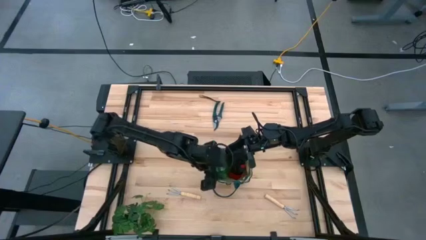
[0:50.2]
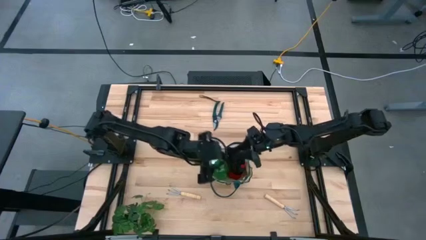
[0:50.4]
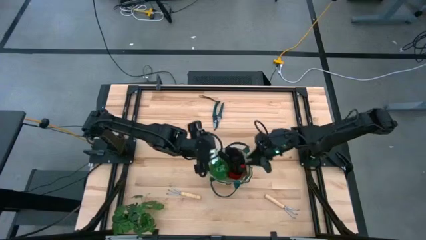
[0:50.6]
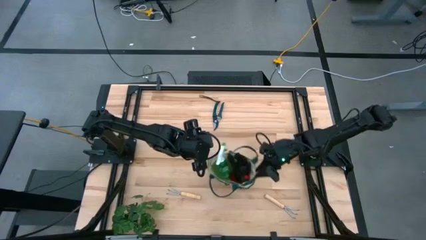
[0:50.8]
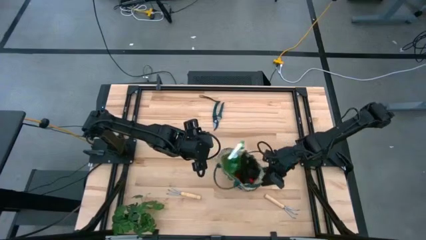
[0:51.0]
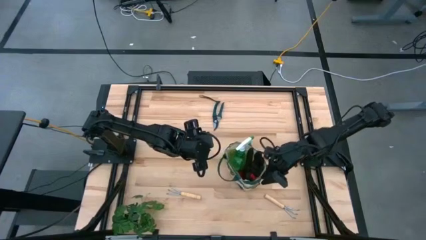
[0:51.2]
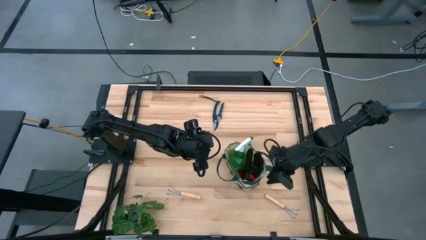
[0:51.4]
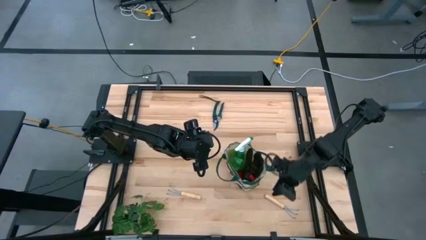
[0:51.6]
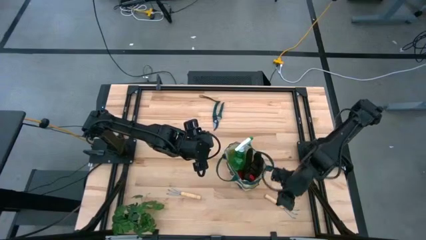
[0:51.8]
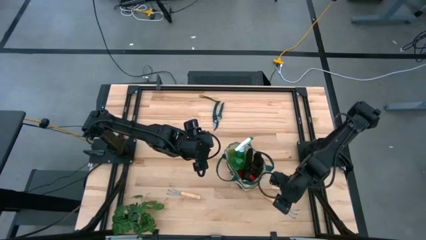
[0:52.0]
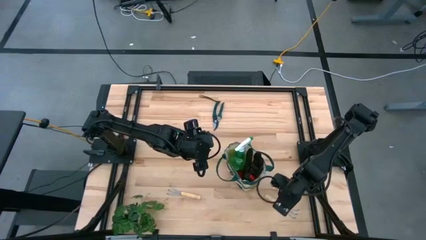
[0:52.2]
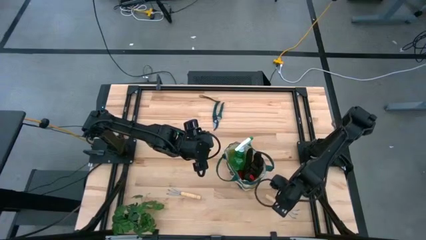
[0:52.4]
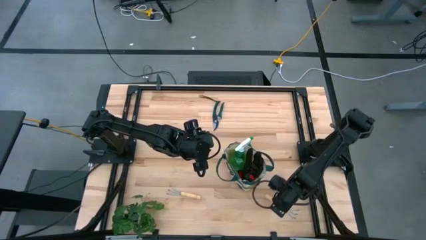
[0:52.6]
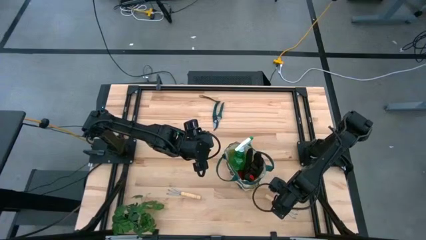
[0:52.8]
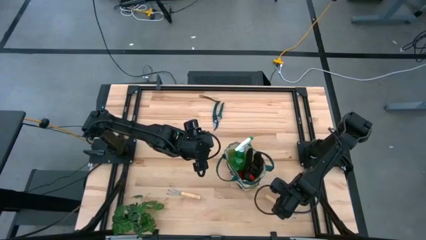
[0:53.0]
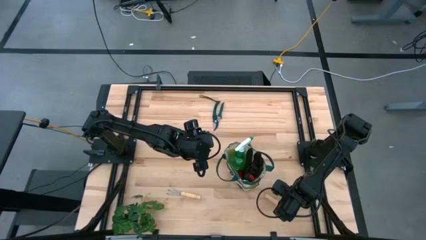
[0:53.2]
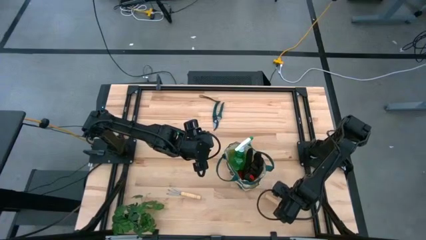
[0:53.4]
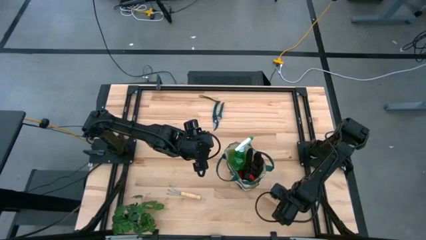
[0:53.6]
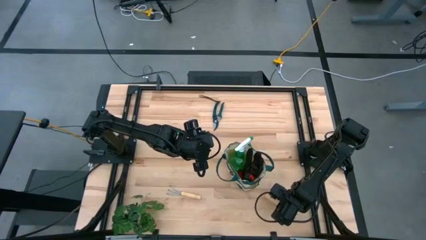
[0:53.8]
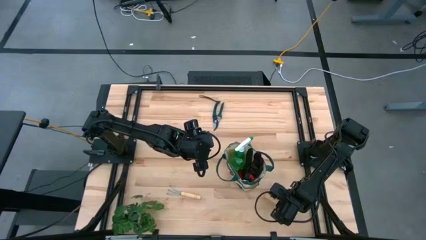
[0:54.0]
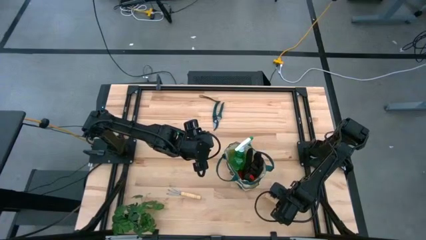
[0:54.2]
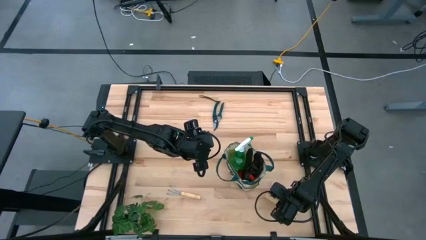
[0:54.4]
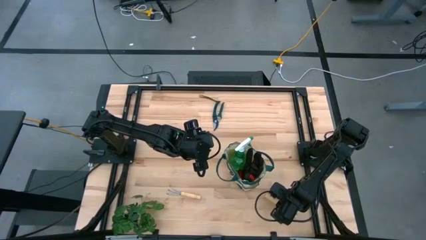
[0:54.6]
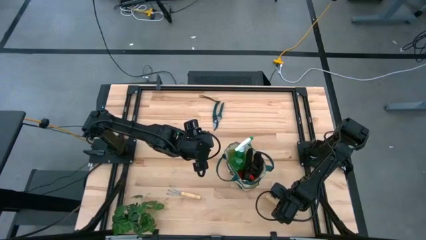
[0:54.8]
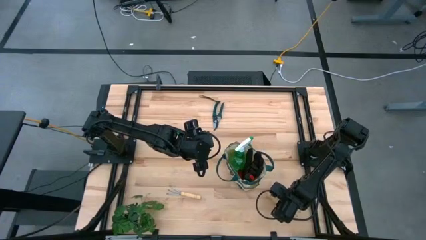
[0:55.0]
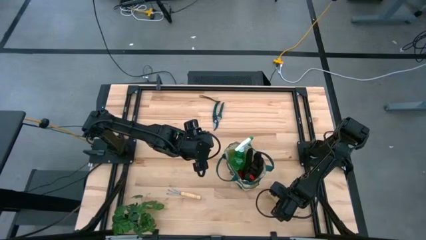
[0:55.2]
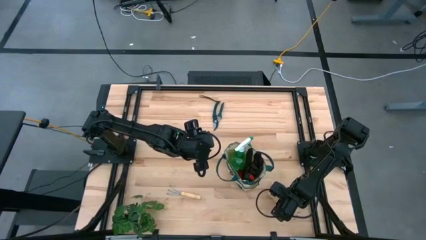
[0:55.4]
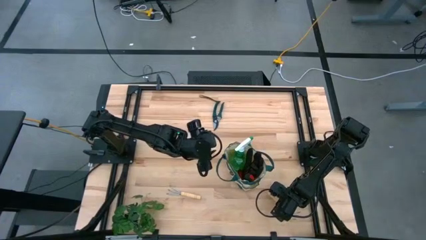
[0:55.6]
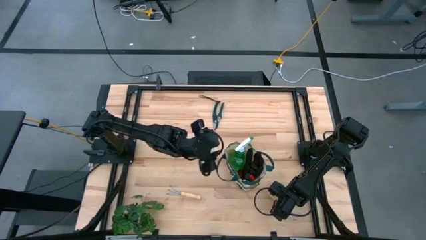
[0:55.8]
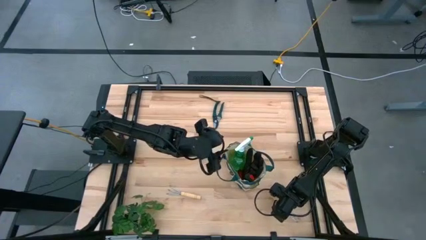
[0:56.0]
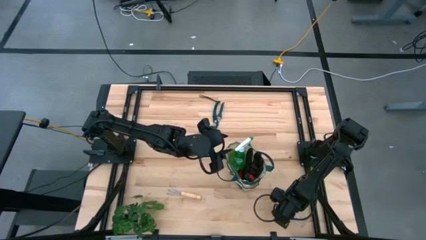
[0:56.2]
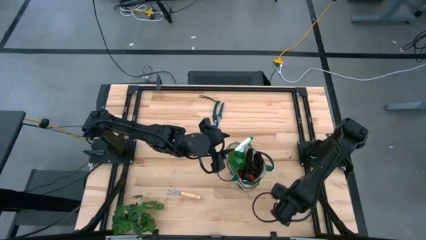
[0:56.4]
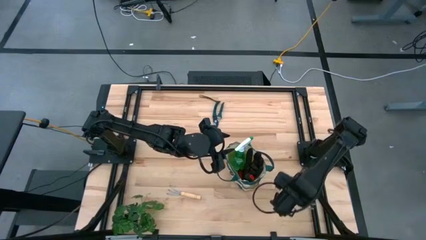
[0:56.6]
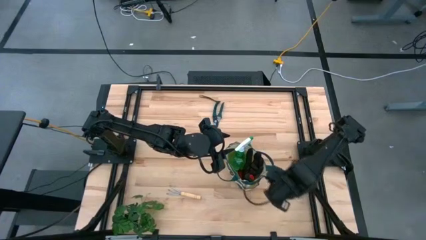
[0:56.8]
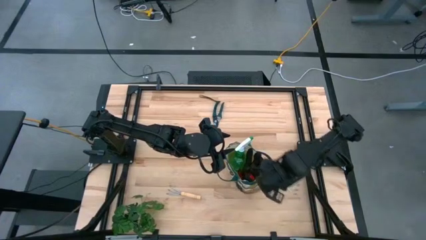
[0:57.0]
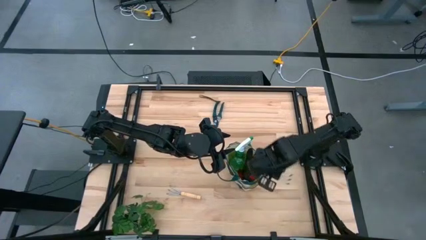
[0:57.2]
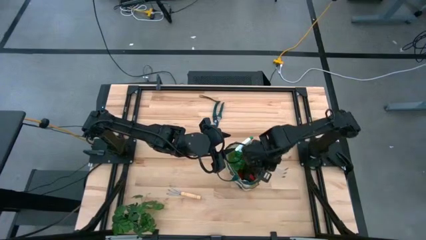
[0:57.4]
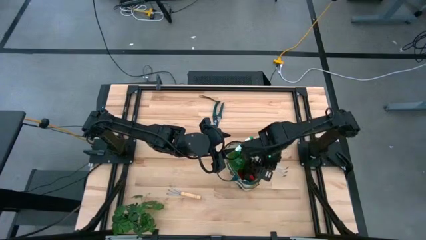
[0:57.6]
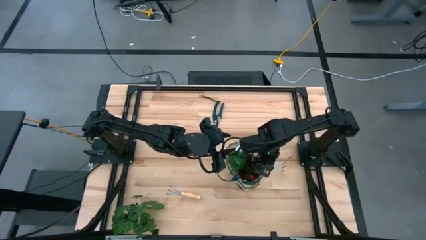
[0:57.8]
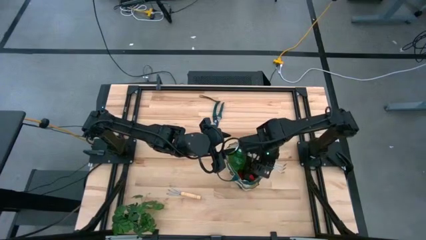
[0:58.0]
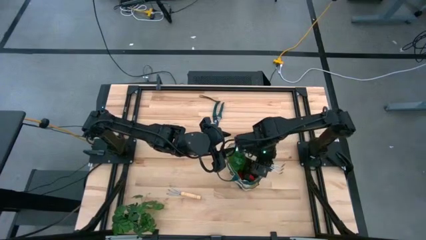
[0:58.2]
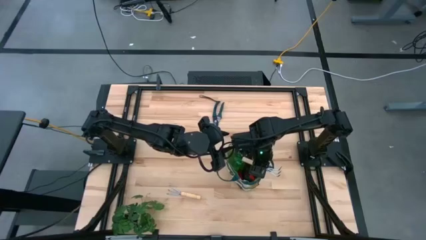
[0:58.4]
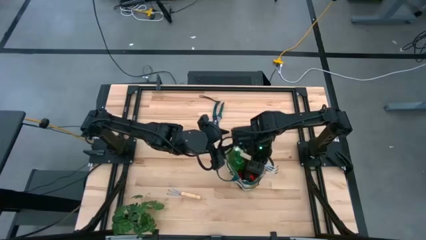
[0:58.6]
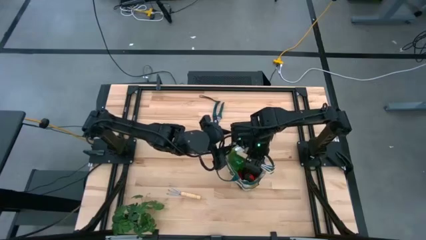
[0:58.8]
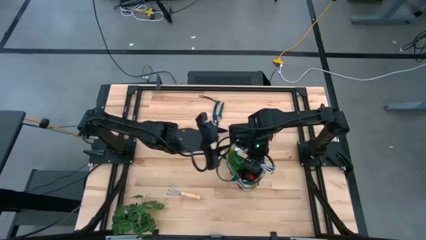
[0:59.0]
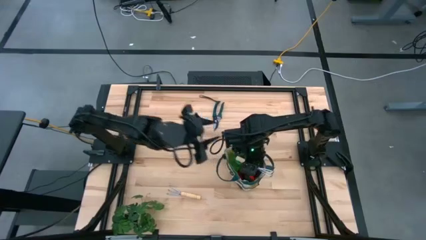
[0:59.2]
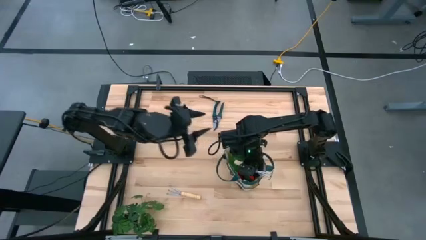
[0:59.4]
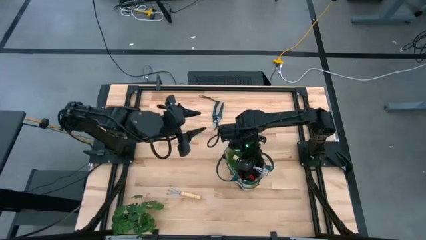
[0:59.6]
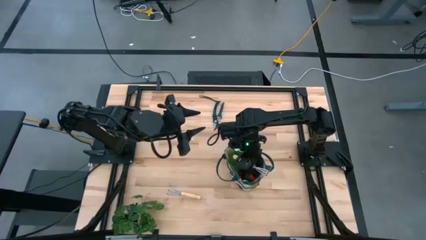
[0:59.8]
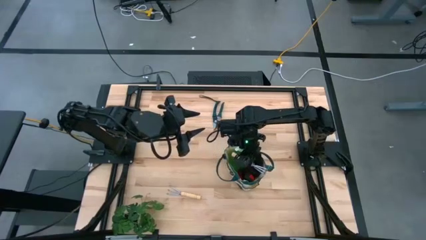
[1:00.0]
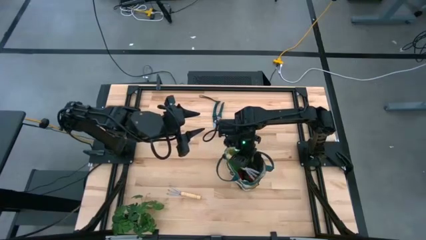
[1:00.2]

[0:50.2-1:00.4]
Task: Pick & Place Garden tools in Gardening bag
Put the right brown hand rake into the green gardening bag

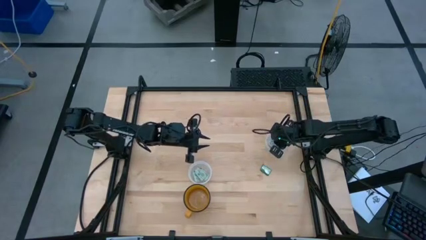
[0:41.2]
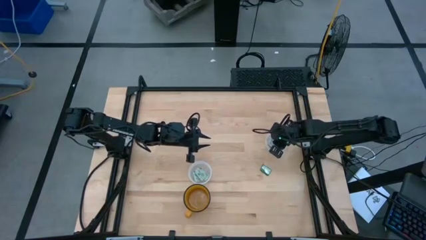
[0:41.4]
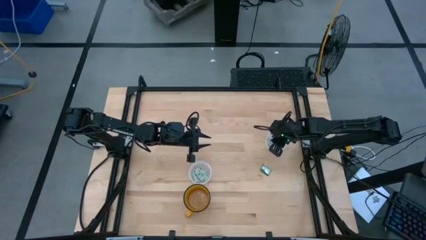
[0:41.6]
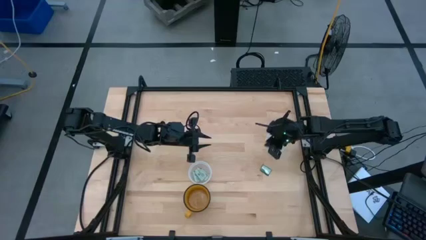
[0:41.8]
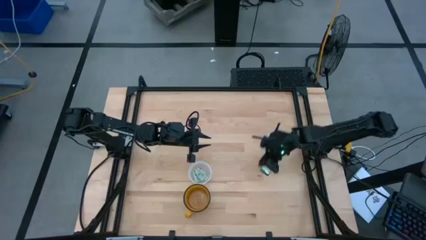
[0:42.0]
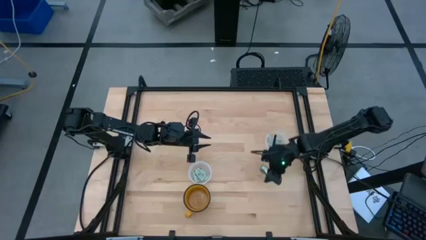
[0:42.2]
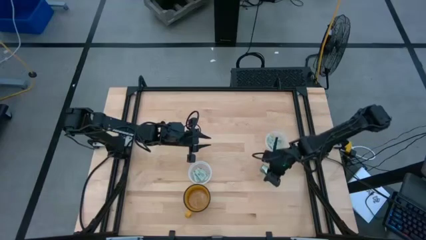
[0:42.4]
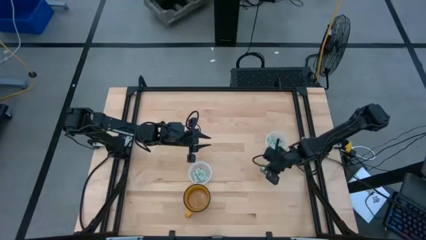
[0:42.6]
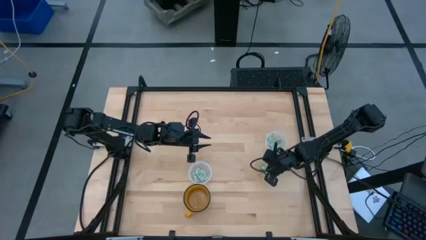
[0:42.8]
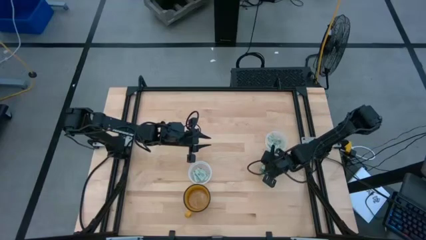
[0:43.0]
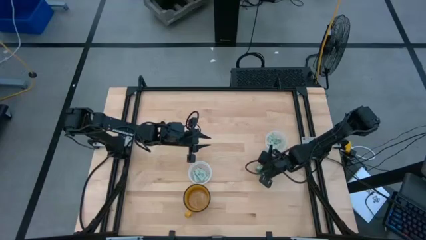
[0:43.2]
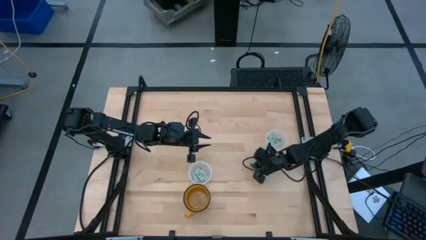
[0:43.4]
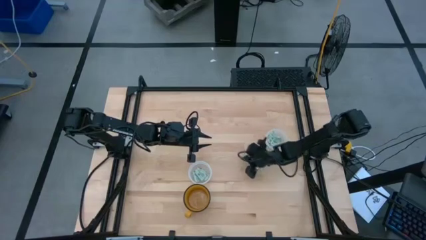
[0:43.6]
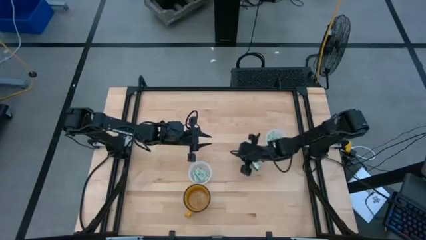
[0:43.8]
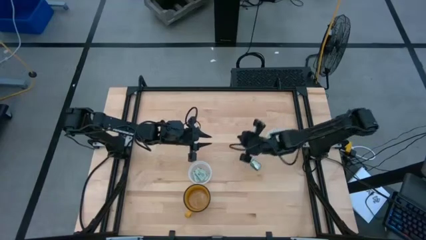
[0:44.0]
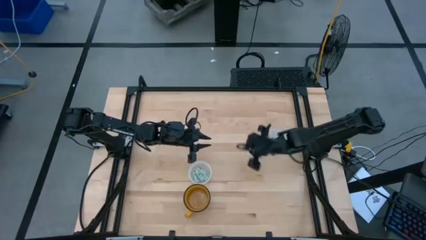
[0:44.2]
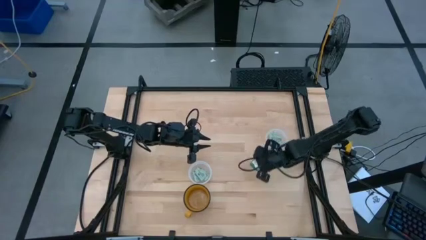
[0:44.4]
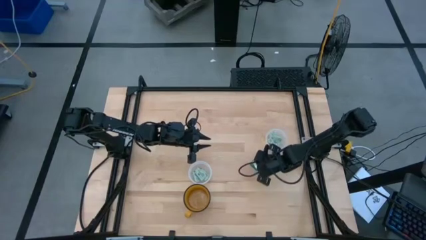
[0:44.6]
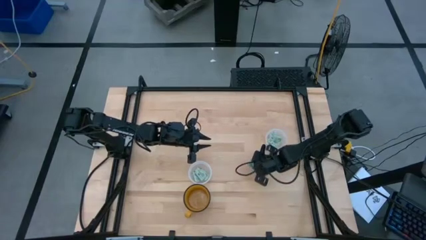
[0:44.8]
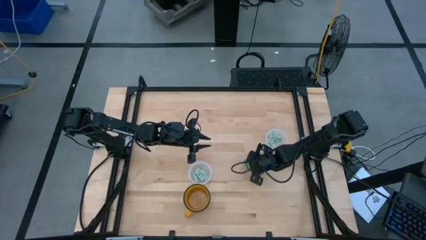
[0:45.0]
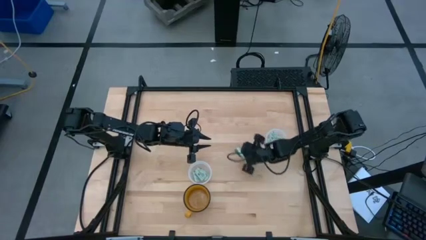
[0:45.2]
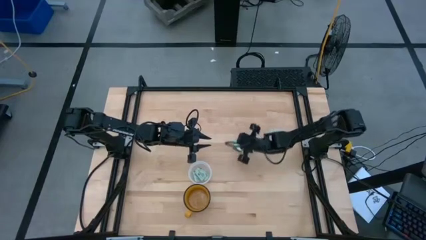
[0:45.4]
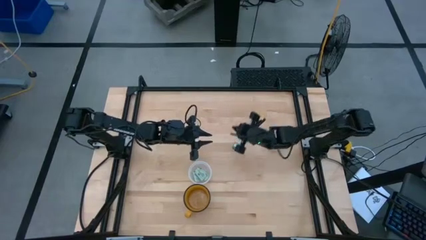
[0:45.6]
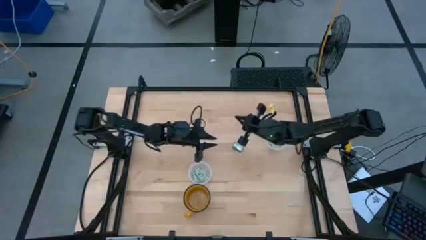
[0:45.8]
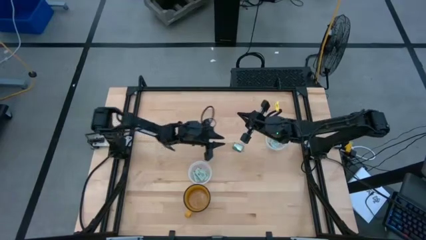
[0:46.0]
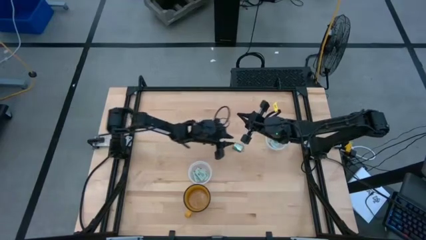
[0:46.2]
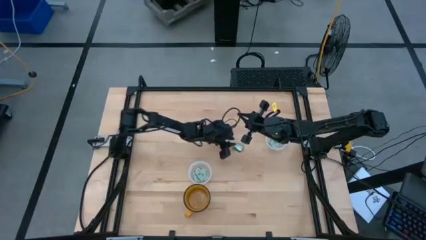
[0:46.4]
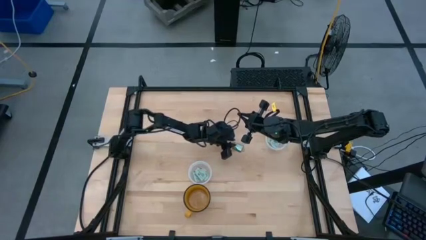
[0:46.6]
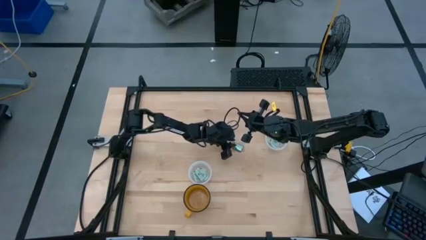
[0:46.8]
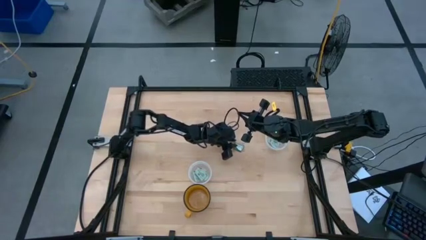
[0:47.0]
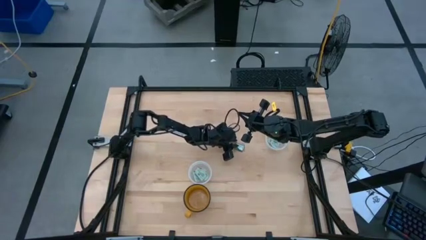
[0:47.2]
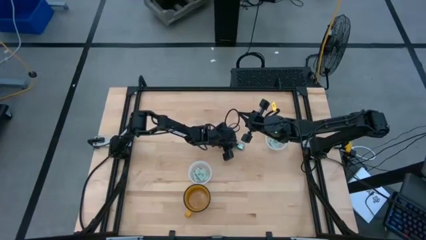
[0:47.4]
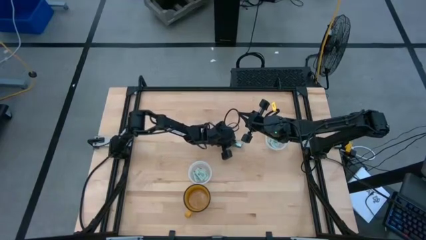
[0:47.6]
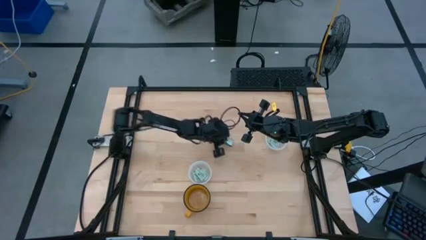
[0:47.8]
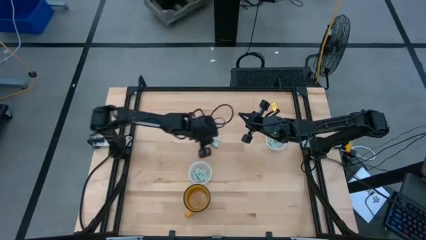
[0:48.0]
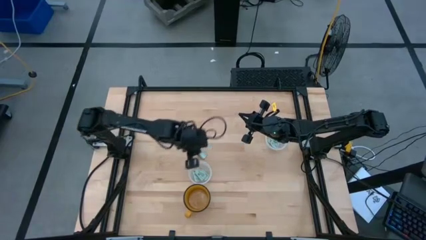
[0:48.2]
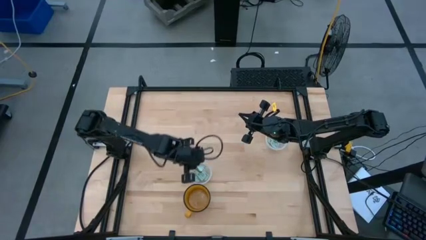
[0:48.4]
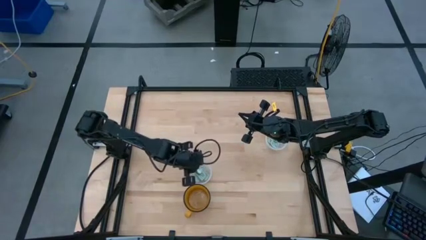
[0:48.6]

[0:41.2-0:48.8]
Task: Pick and place items into bin
Put the stevia packet into the left transparent bin
